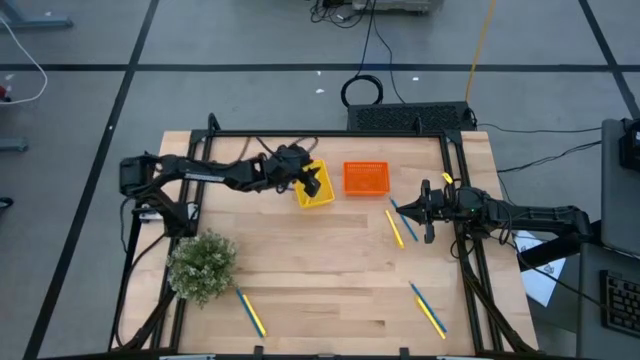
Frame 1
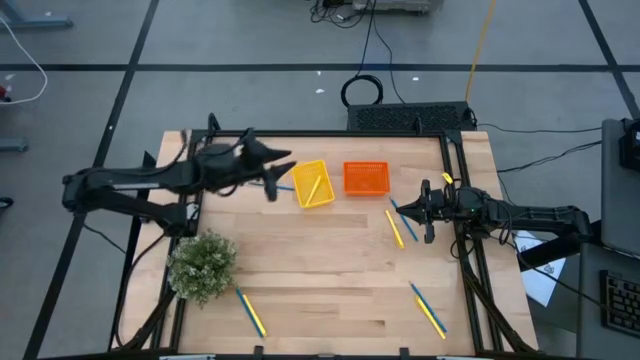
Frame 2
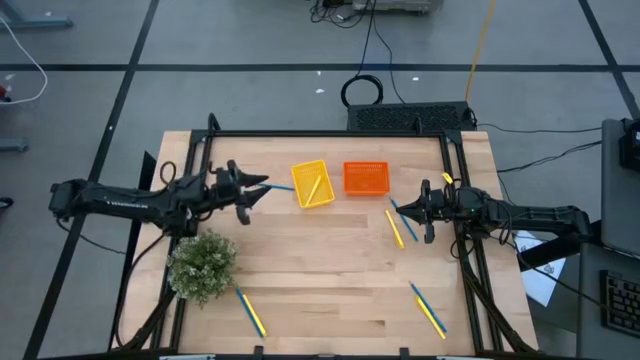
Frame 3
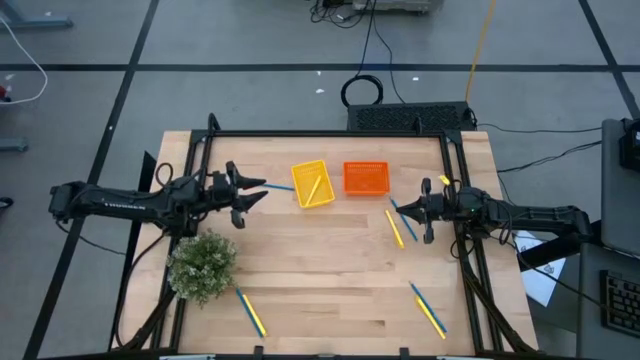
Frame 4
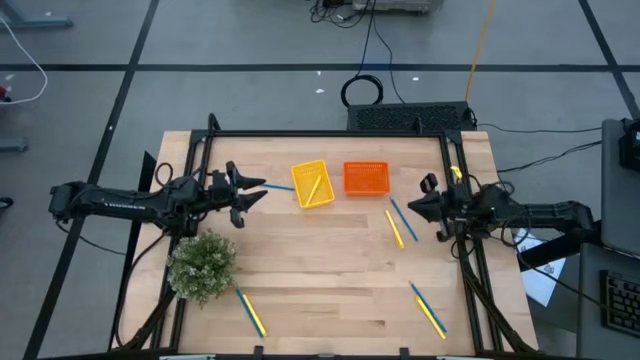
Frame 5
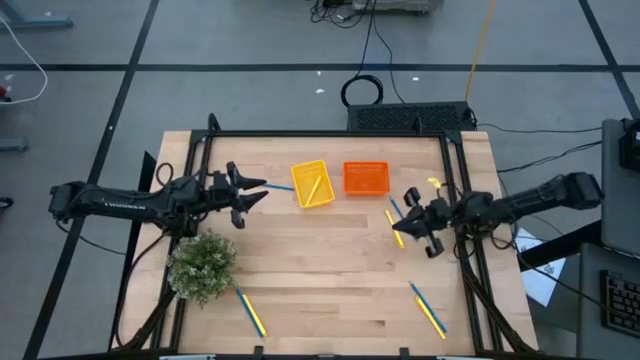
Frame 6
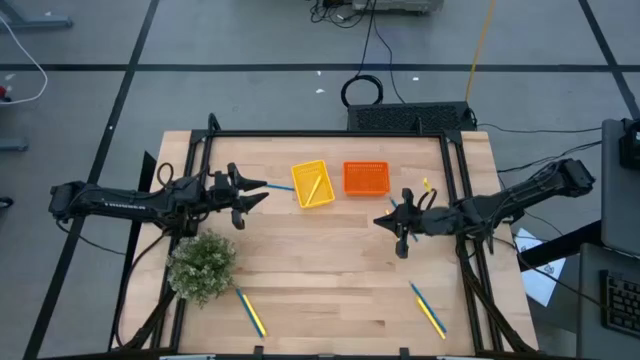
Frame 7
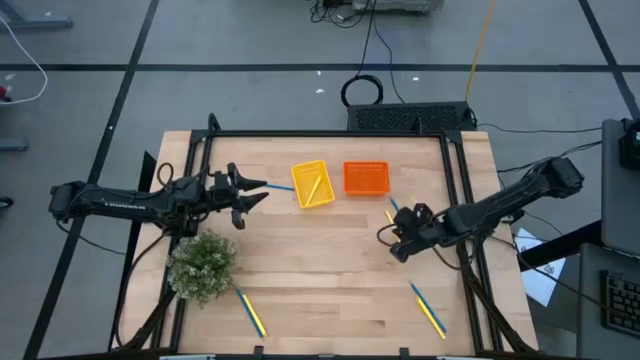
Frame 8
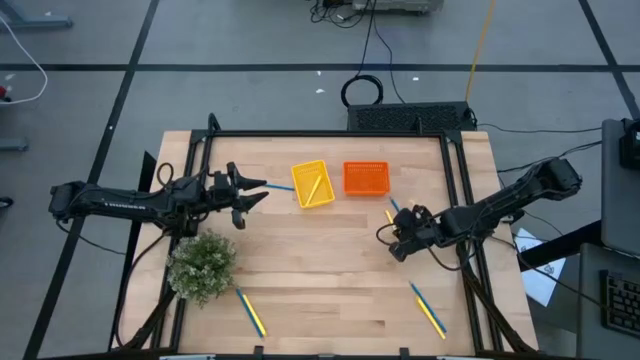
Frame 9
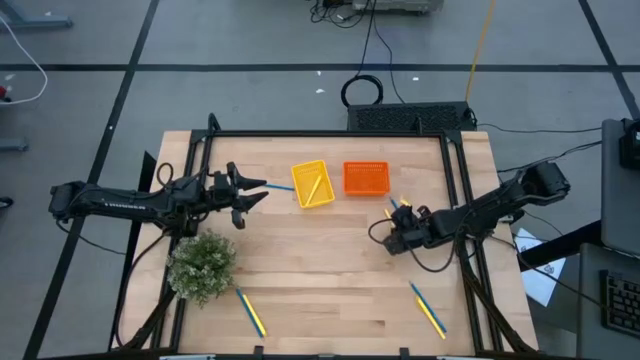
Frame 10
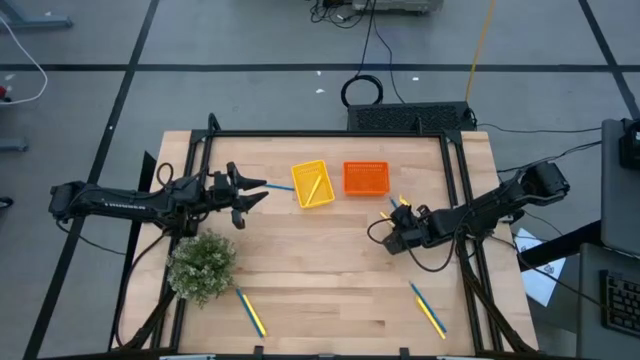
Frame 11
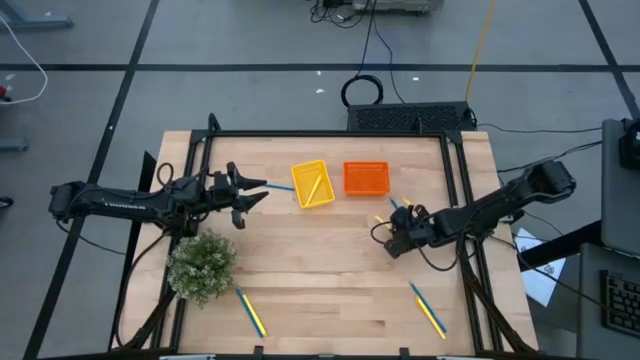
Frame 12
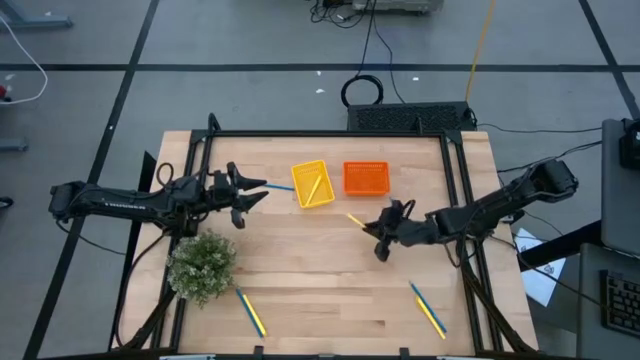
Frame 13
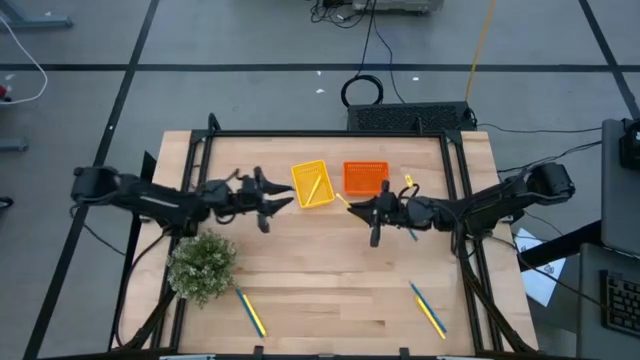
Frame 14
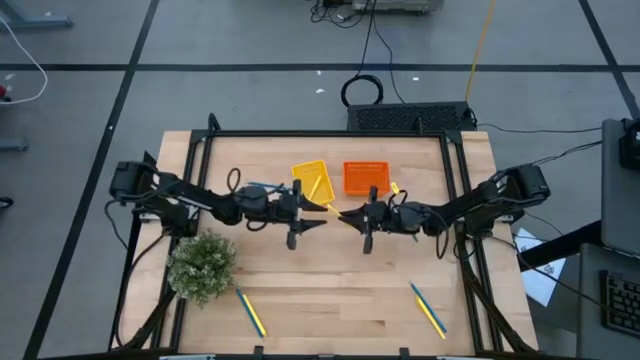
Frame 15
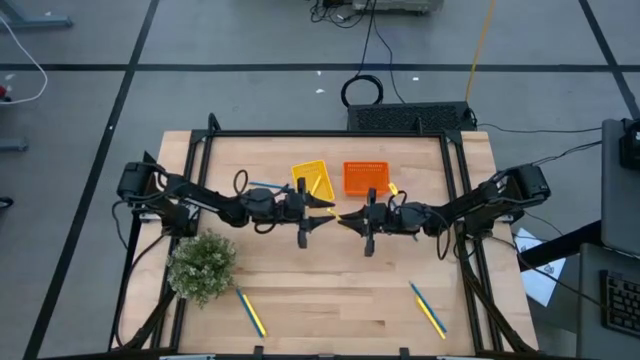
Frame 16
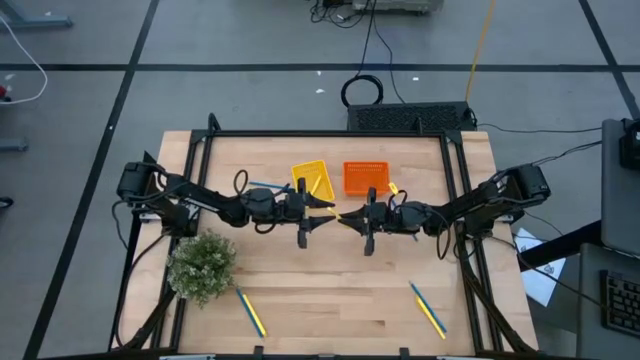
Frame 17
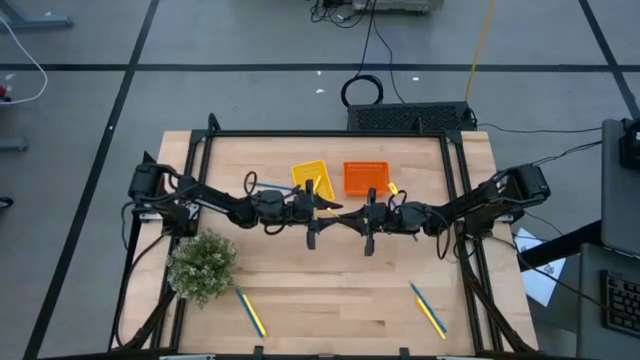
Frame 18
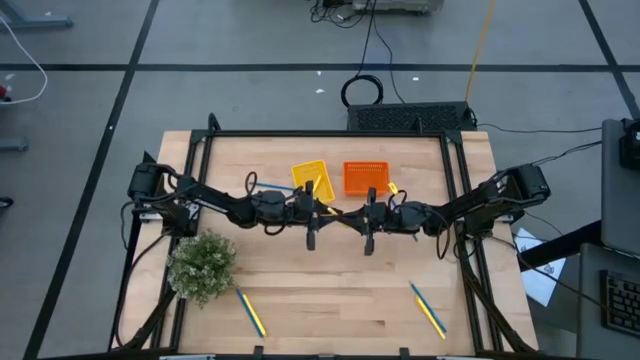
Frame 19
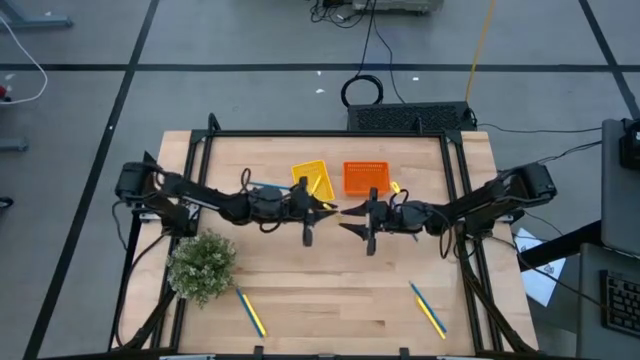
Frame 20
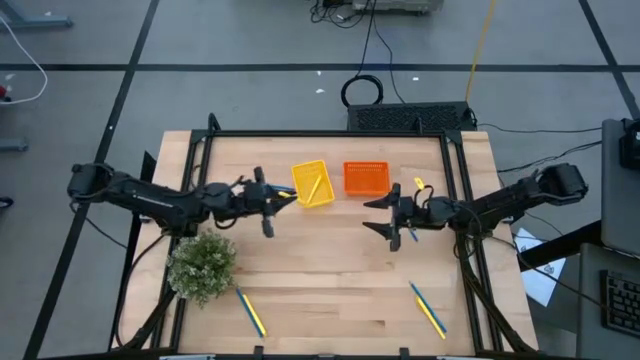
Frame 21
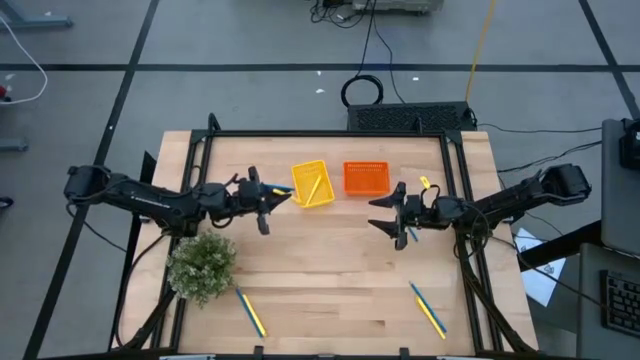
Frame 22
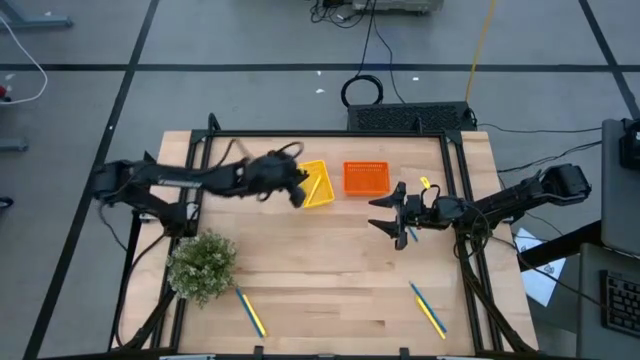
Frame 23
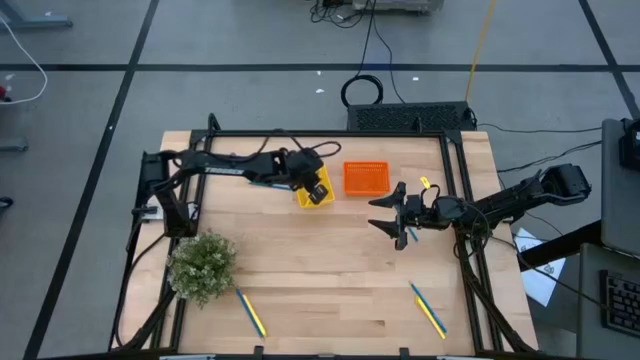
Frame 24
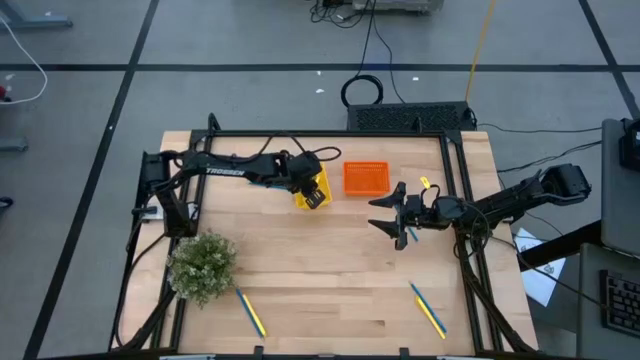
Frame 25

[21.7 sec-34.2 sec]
Task: Sort pens & pencils
Put the top yellow pen into the yellow basket

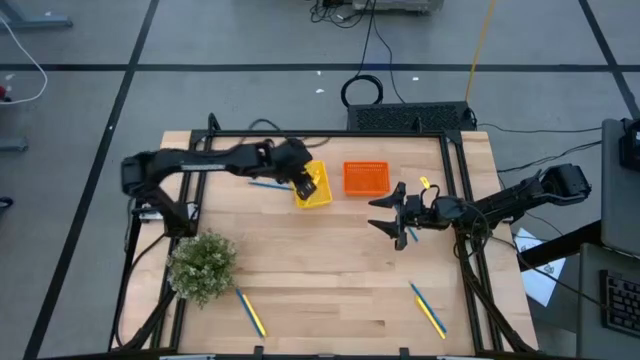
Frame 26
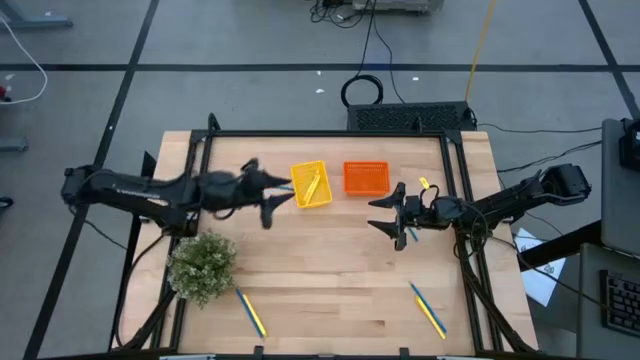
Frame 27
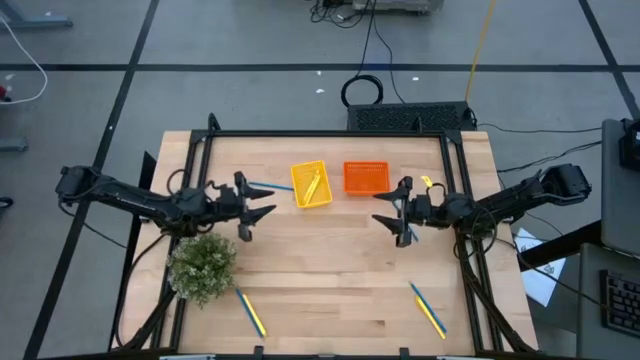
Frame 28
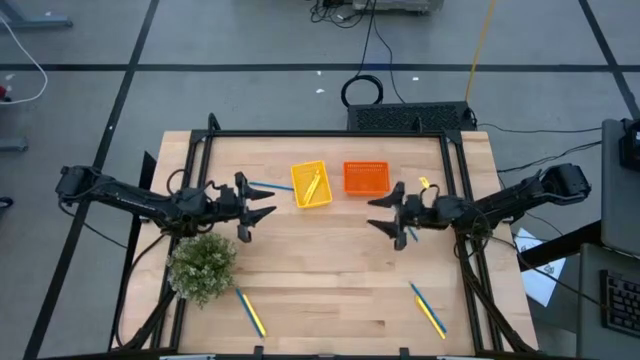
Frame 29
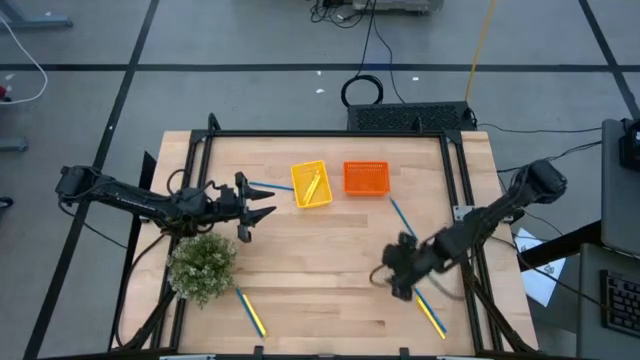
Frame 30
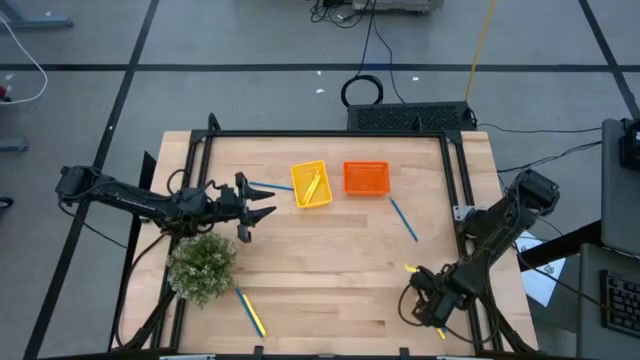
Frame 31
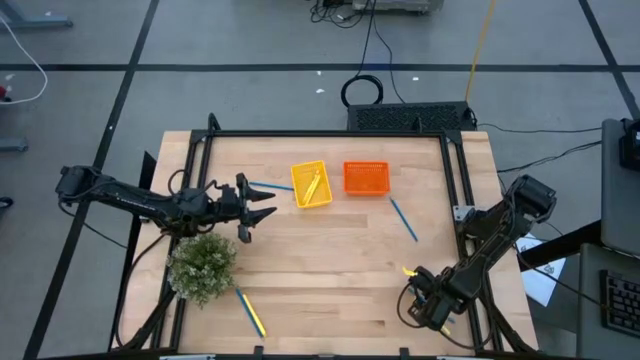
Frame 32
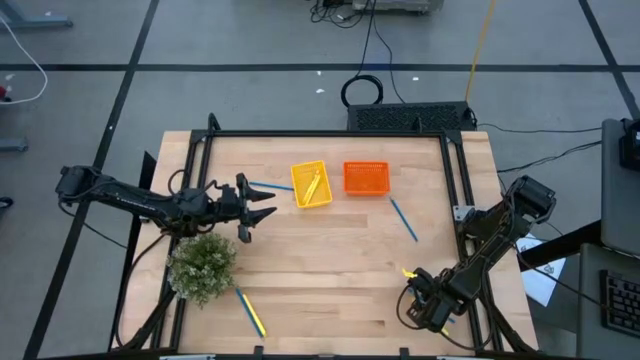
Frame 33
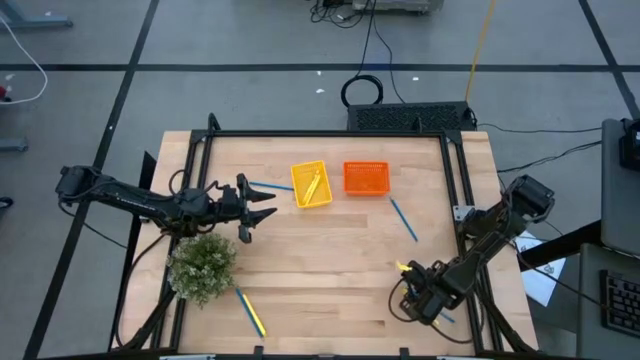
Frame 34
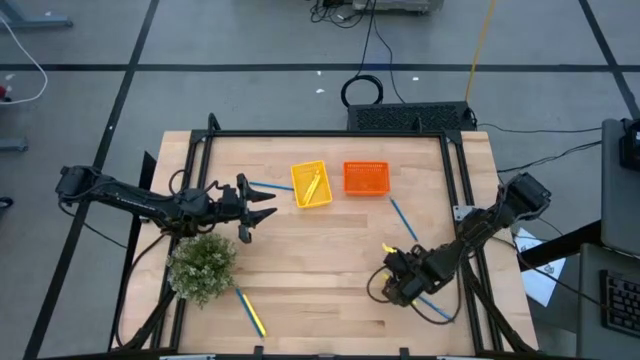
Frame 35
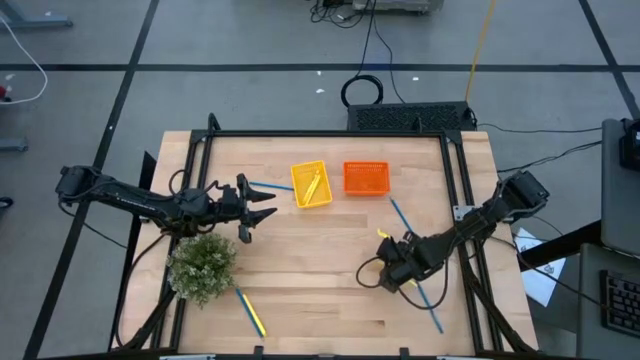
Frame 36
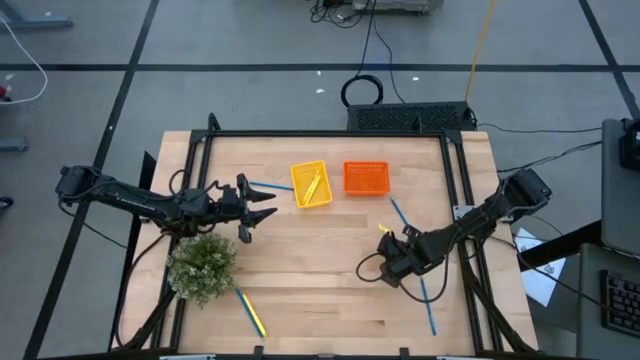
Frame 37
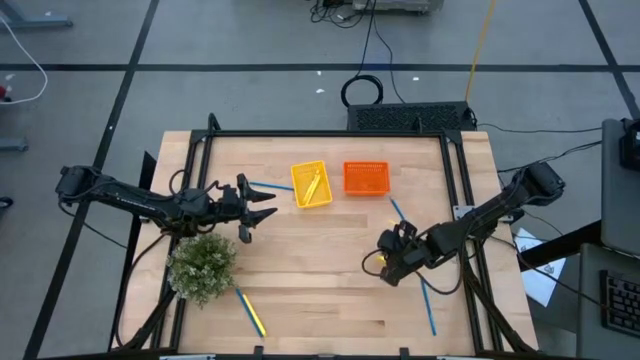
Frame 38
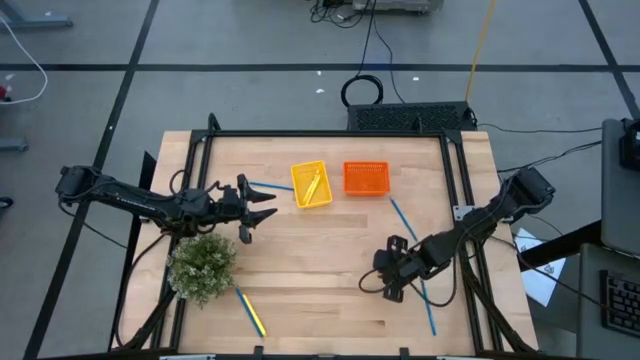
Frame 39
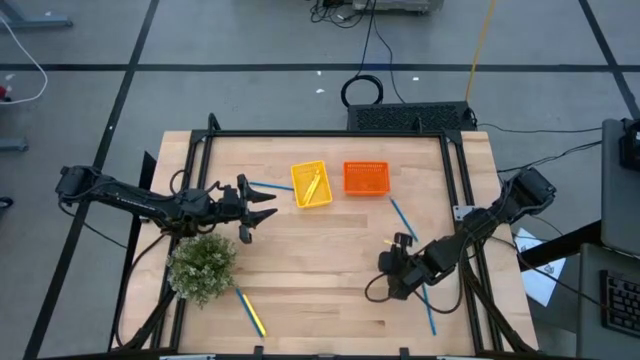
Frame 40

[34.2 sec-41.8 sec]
Put the right yellow pen into the yellow basket
